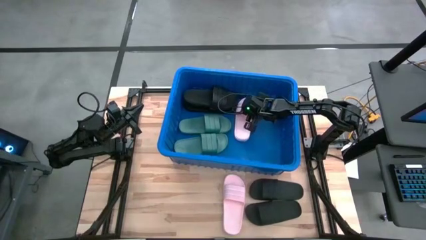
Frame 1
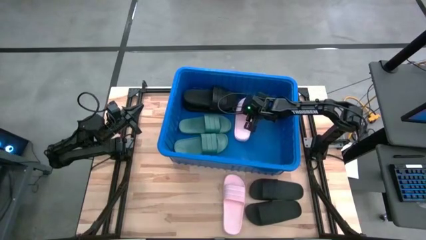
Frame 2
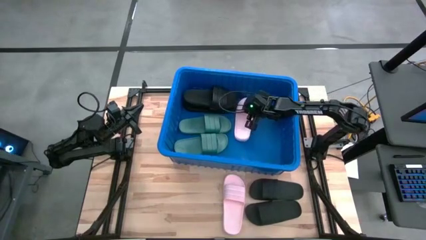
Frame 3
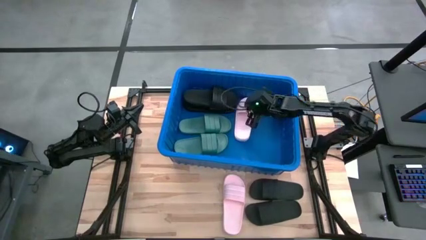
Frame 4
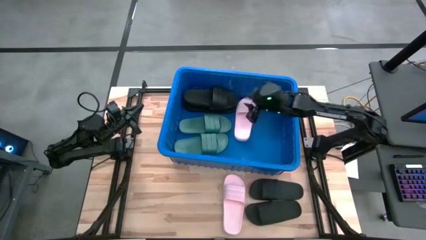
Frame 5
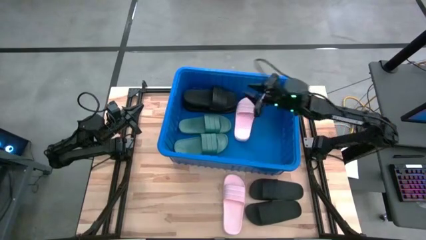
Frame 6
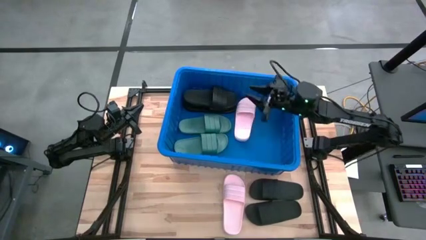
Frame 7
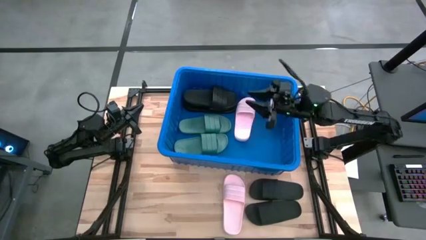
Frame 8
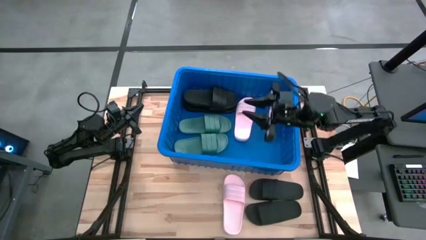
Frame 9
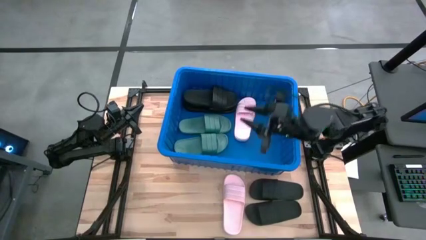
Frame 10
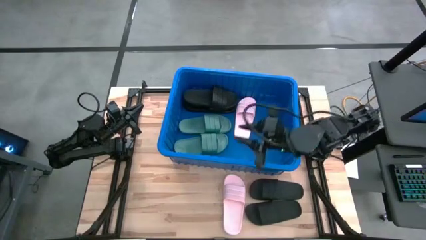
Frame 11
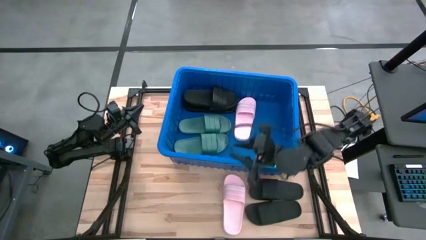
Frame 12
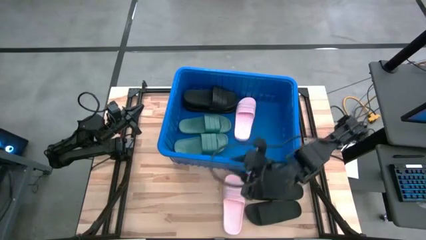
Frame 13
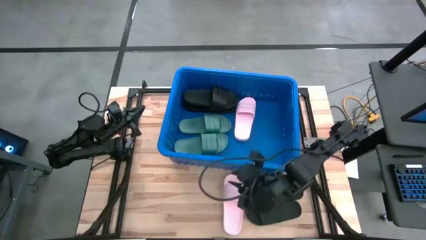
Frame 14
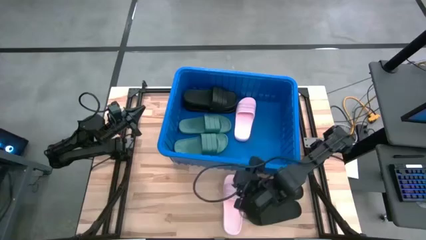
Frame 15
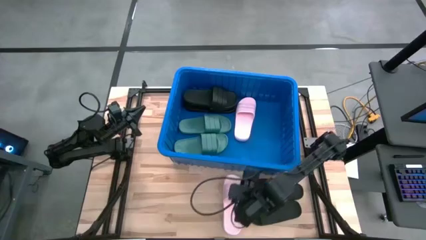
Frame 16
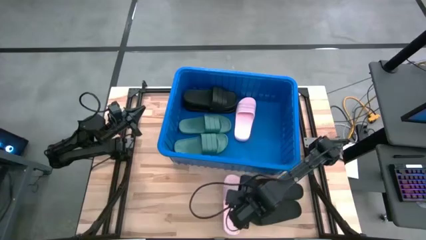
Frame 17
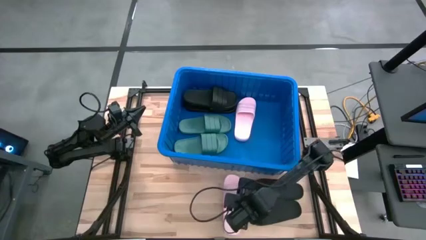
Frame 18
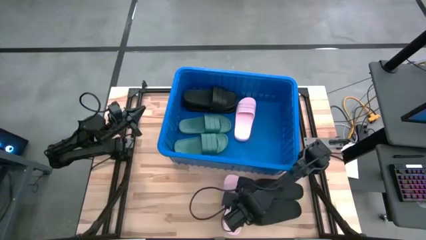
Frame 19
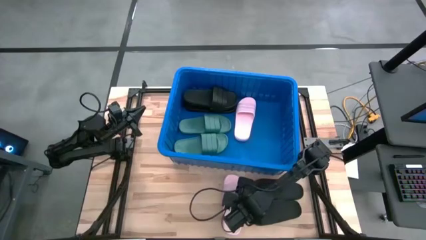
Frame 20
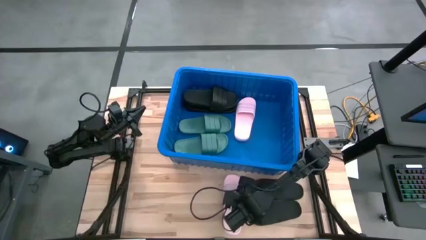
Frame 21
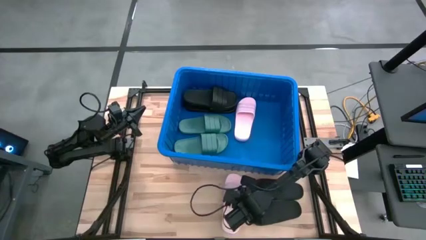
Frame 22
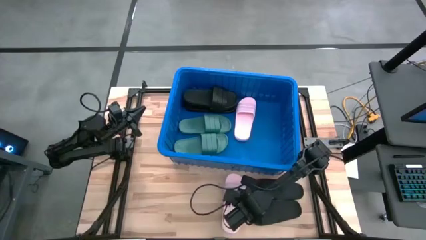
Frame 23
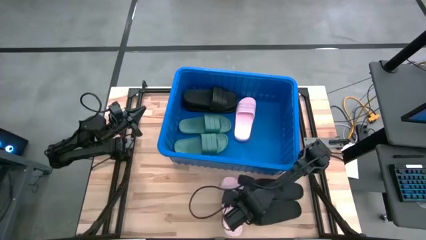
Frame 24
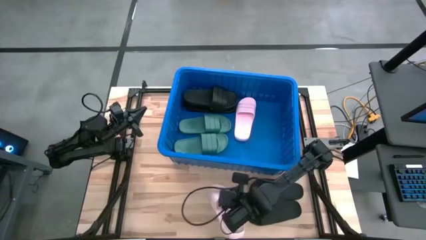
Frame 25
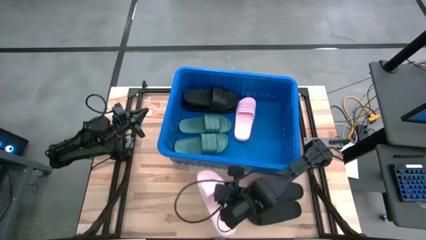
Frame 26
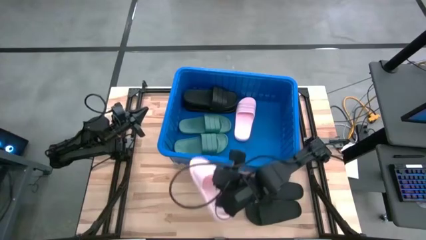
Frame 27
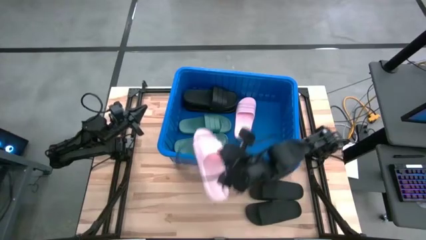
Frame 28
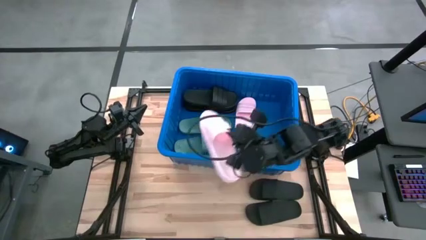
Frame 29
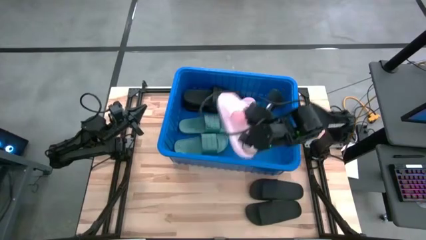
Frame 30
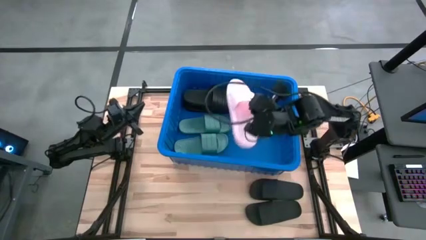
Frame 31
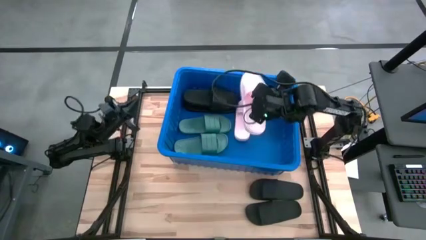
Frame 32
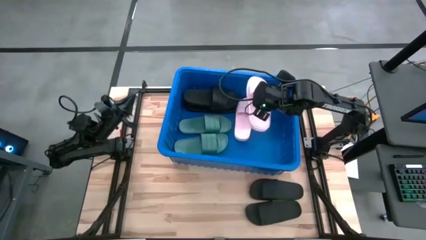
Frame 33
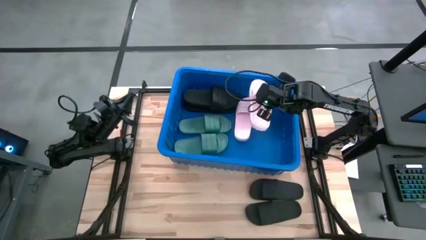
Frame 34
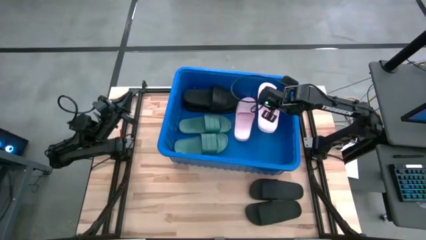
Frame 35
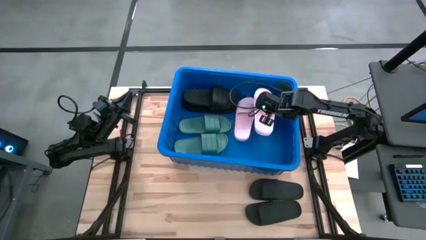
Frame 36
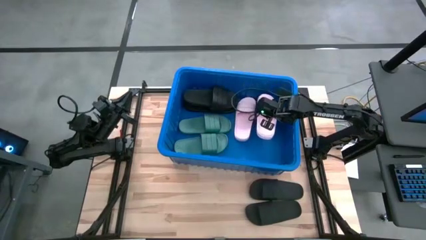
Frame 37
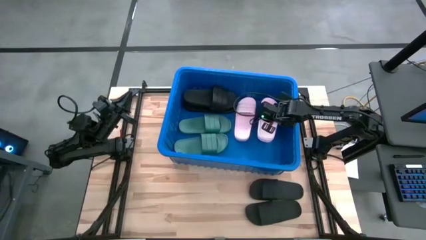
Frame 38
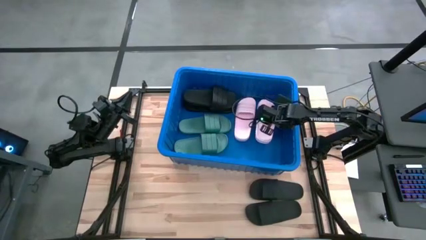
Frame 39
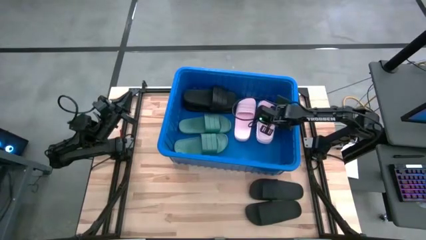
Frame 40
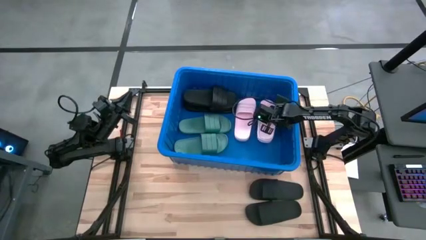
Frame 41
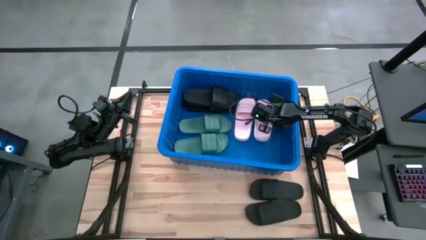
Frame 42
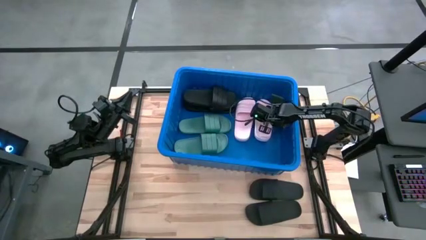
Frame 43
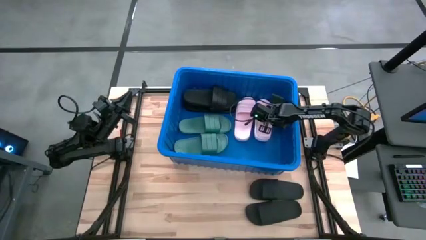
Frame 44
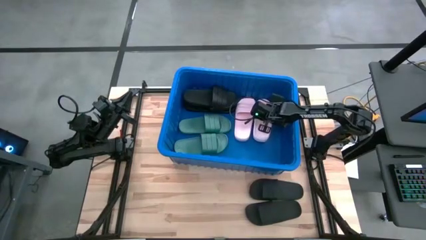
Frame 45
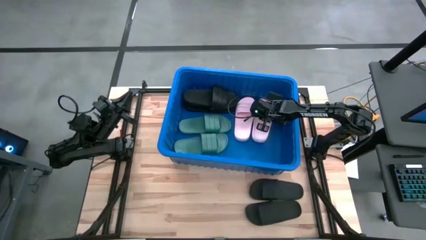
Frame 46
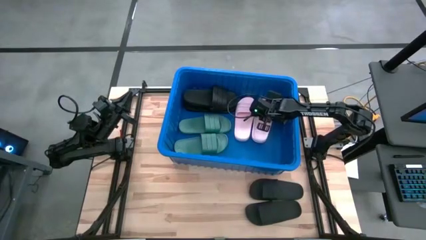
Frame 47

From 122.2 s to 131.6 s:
Task: Pick and place slides into bin
Put the pink slipper into the blue bin

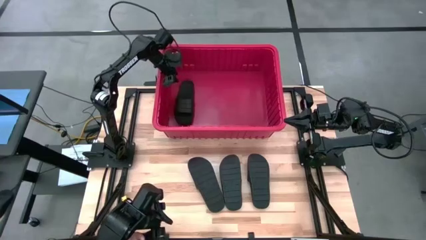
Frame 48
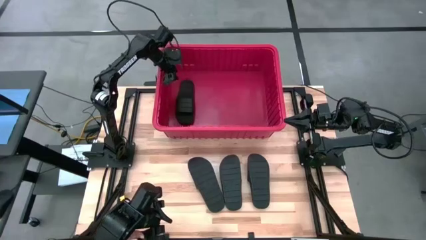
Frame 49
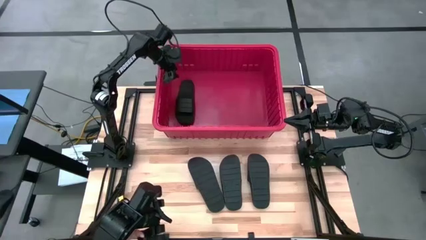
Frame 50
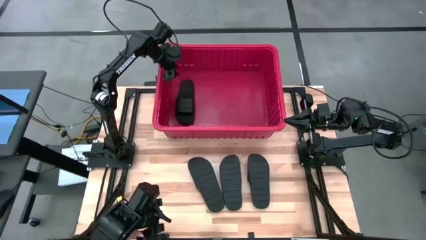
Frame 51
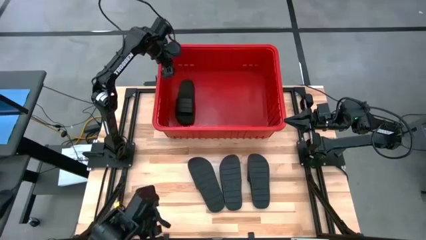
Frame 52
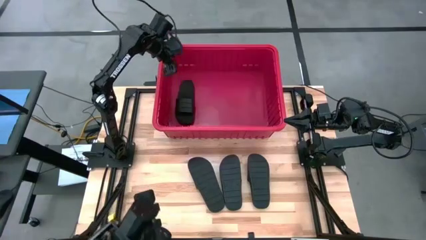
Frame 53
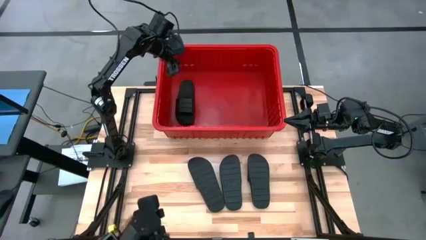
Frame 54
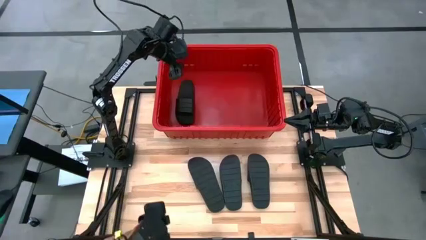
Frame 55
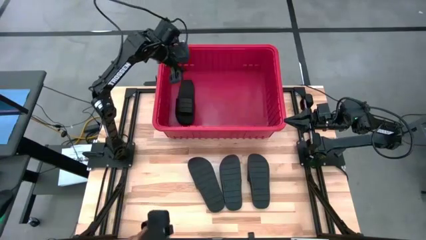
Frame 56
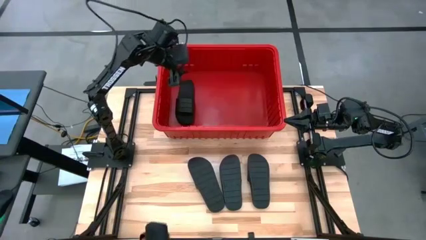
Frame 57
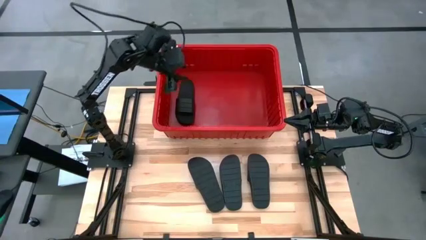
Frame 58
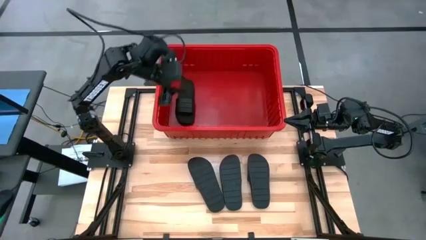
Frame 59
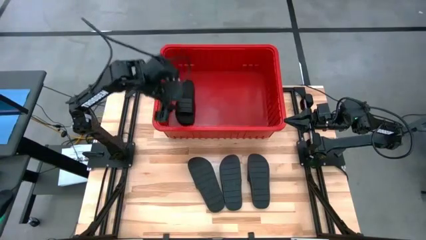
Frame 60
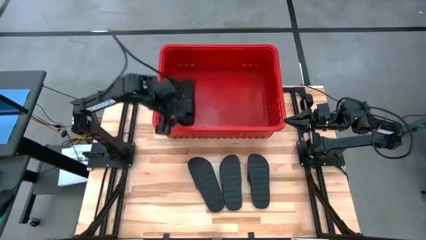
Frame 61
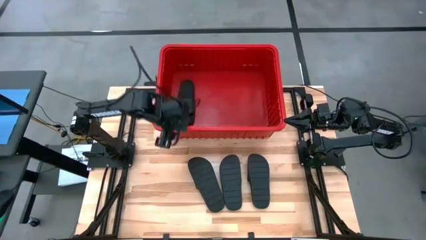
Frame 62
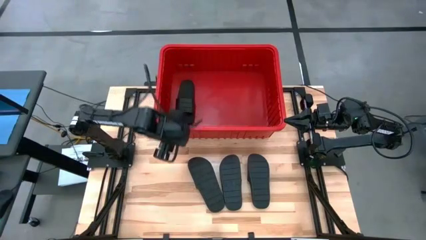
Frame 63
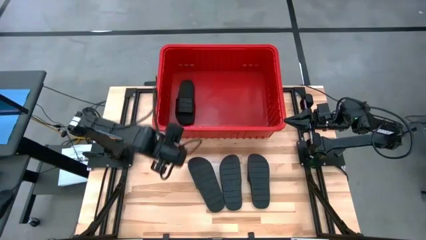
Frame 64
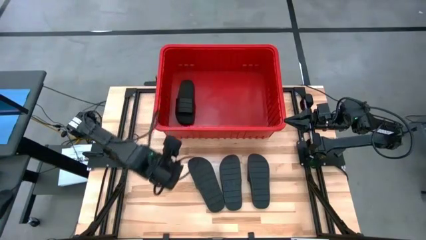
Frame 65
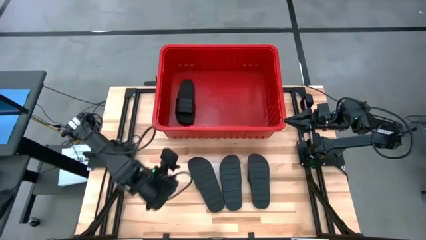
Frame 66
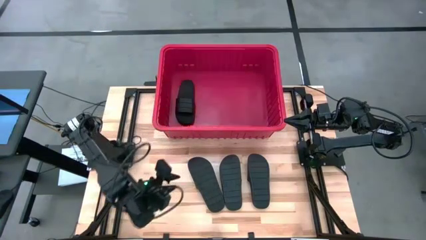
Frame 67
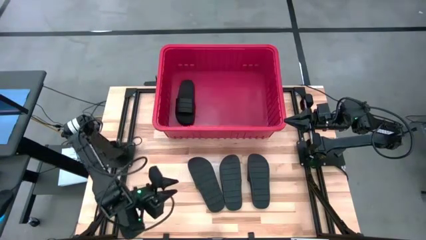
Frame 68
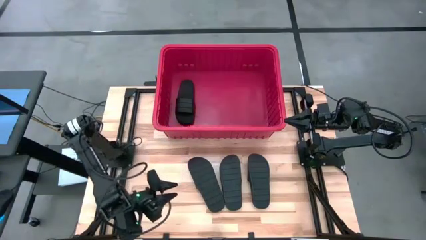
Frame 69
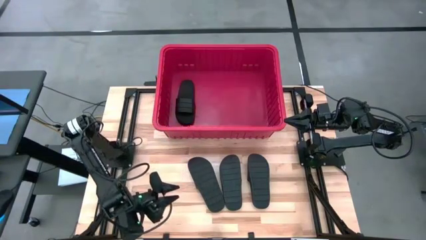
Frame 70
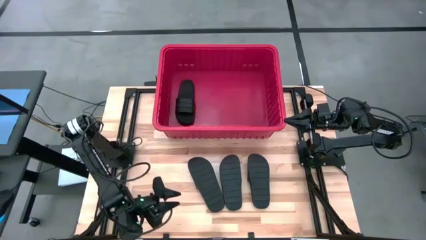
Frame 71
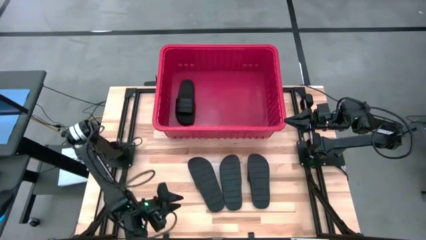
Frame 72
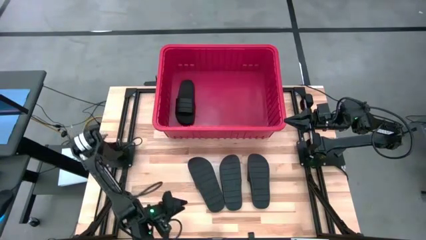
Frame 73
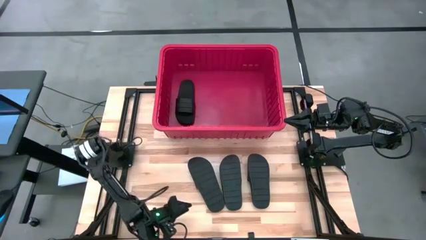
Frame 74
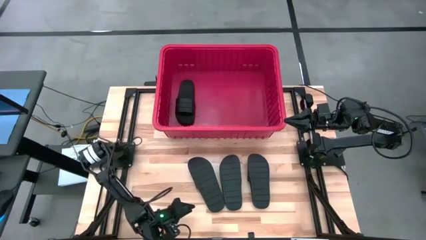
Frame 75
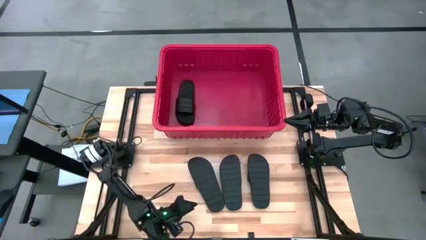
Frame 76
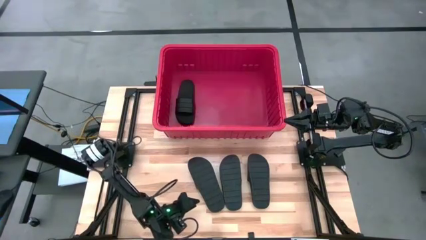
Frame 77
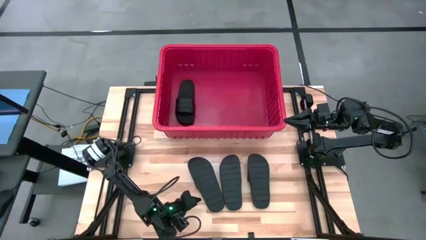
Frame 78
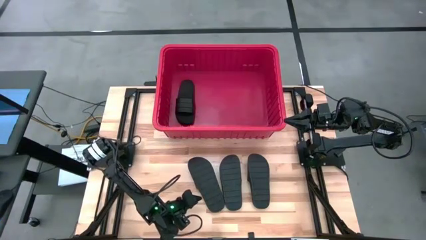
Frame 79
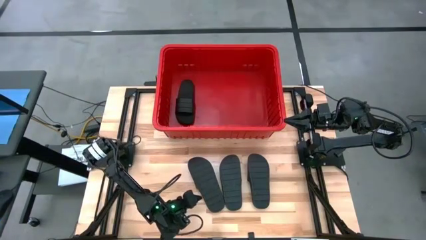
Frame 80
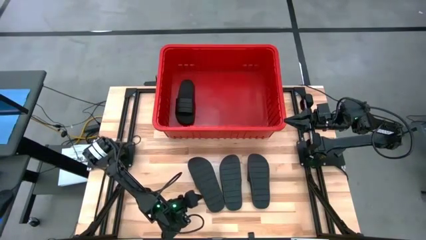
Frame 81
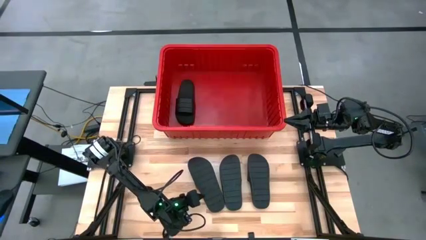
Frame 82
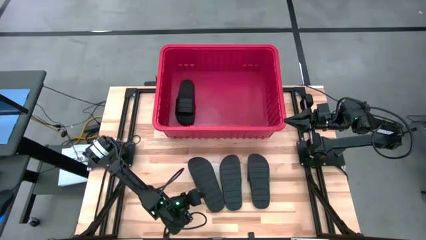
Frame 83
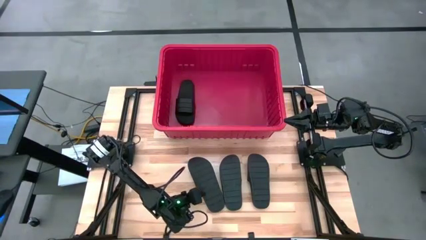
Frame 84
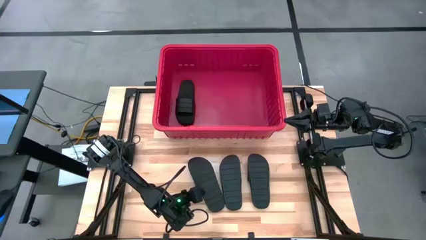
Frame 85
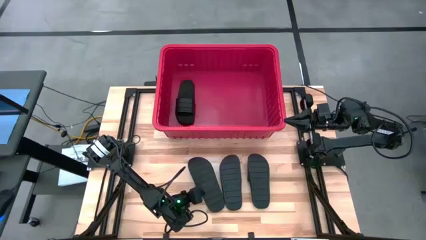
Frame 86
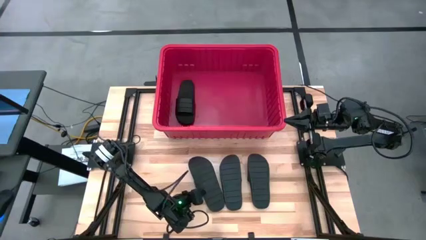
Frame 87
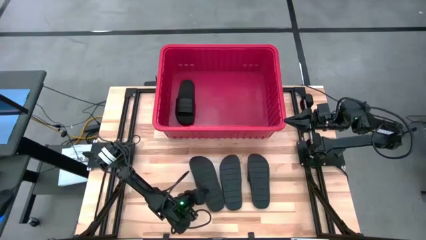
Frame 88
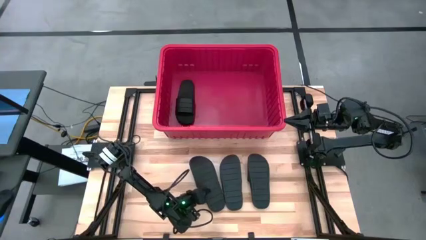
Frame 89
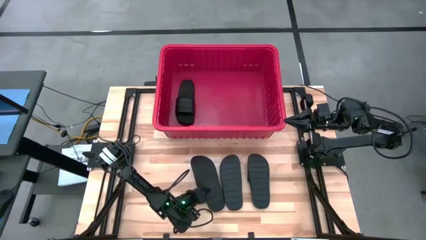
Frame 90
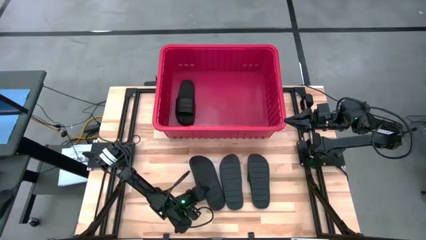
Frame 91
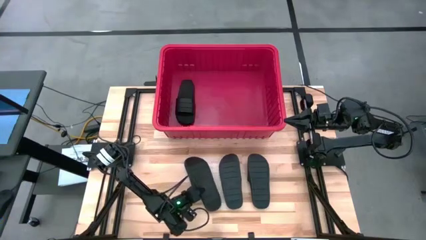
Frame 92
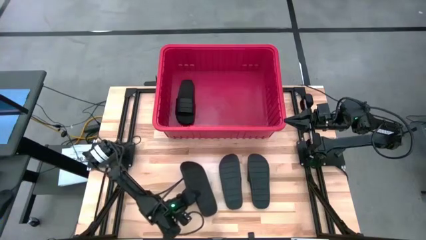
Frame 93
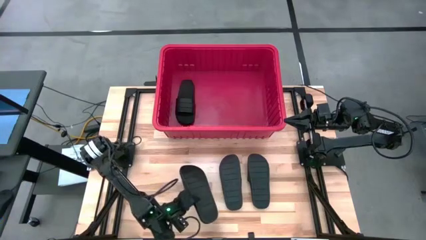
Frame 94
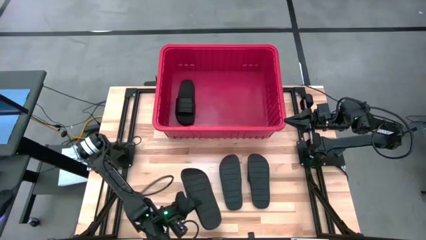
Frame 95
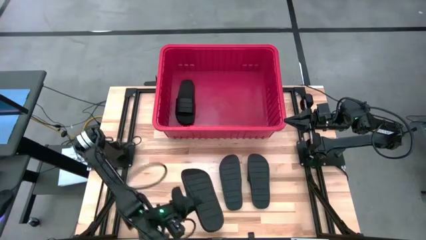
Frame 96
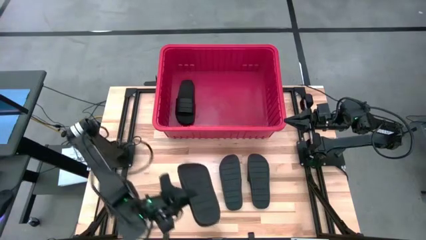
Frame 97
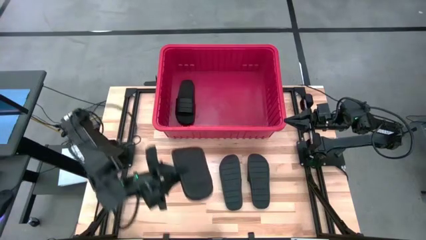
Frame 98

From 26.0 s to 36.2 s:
Task: Pick and place slides into bin
Put the black slide into the red bin
